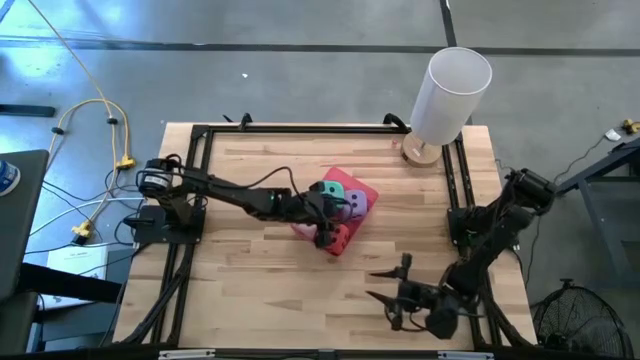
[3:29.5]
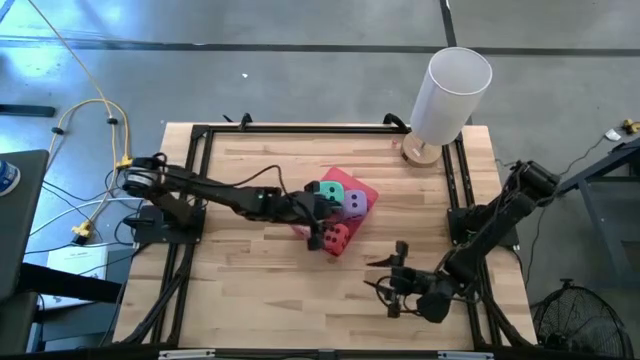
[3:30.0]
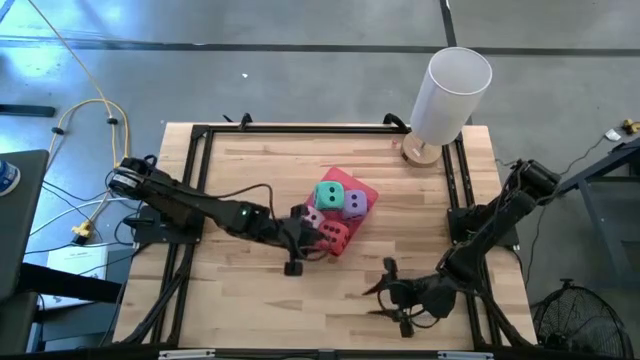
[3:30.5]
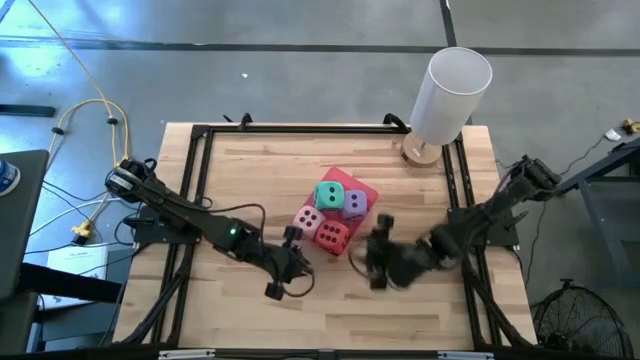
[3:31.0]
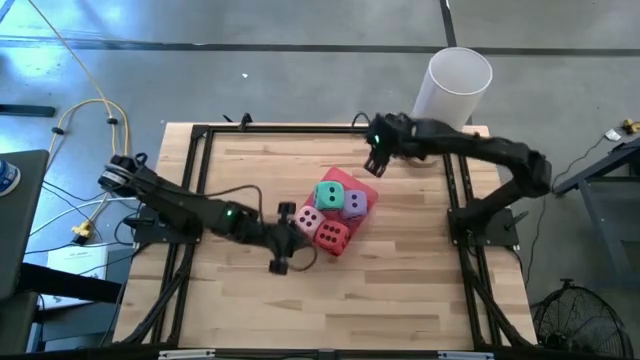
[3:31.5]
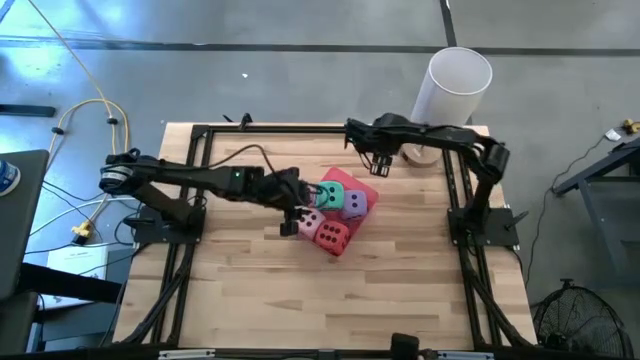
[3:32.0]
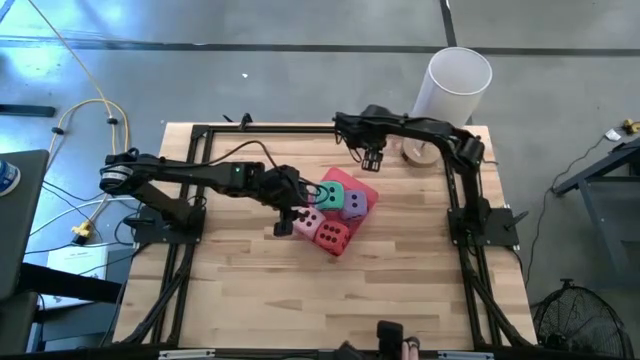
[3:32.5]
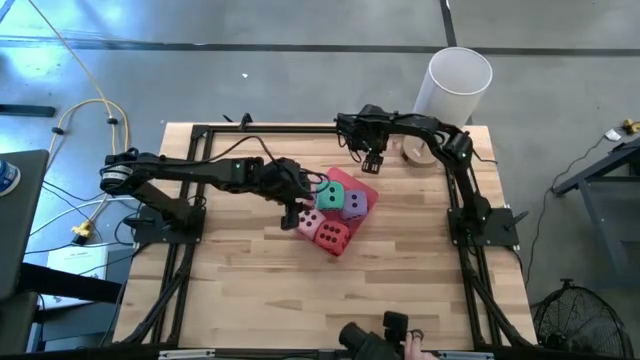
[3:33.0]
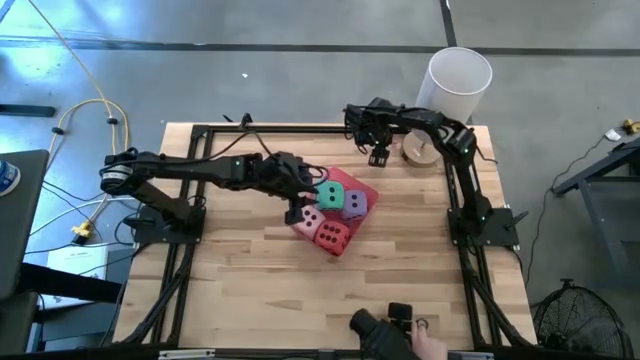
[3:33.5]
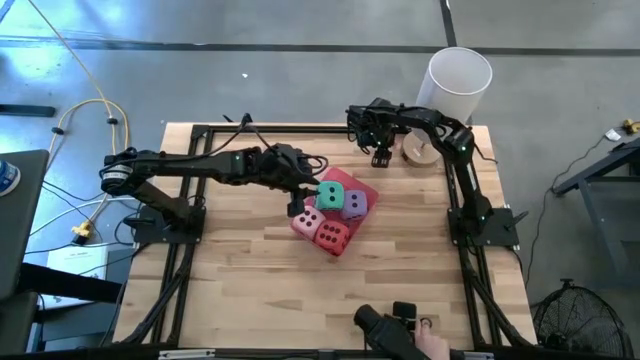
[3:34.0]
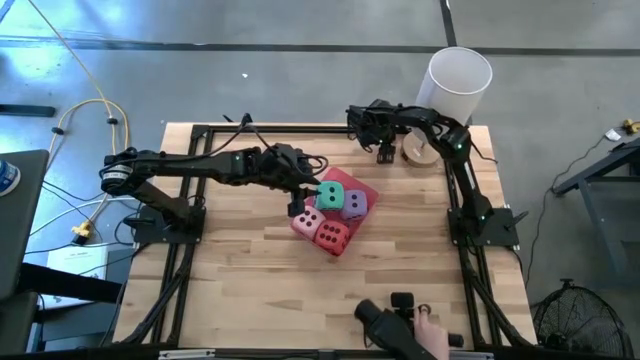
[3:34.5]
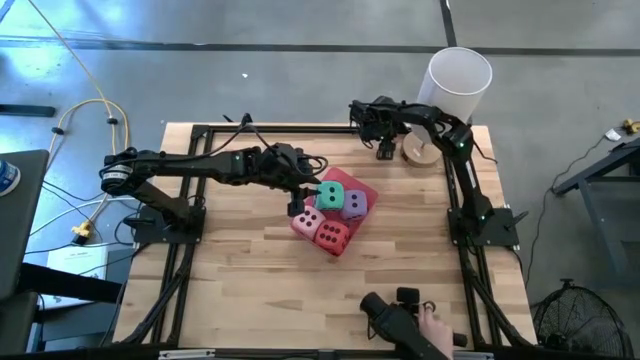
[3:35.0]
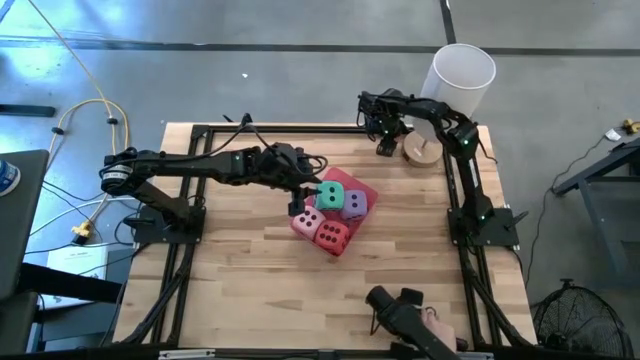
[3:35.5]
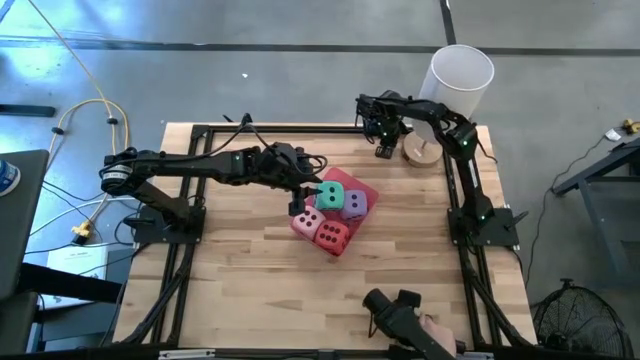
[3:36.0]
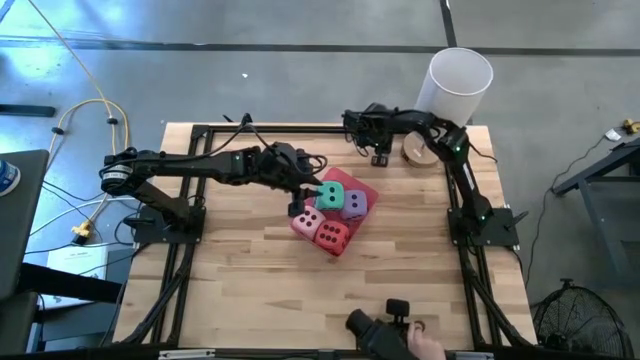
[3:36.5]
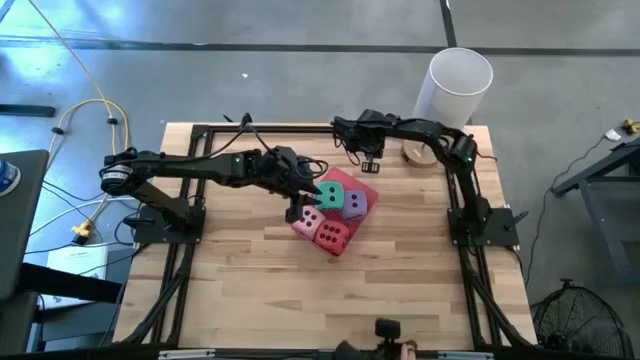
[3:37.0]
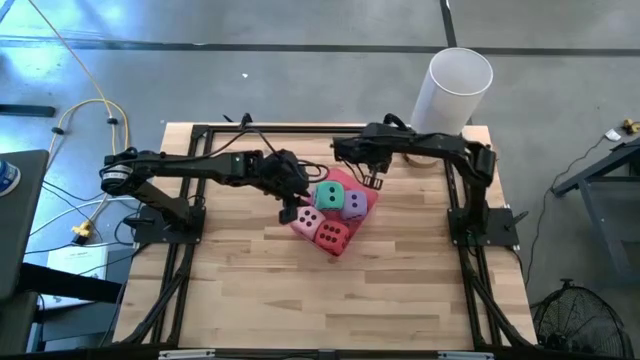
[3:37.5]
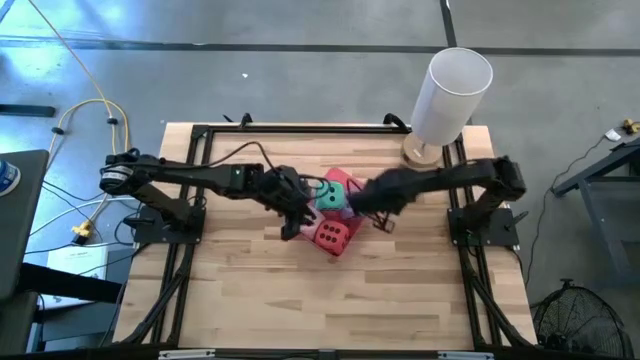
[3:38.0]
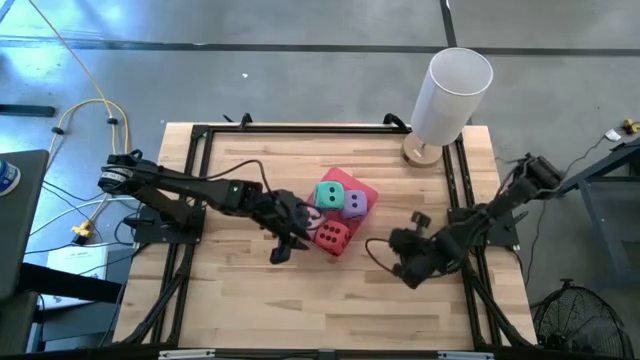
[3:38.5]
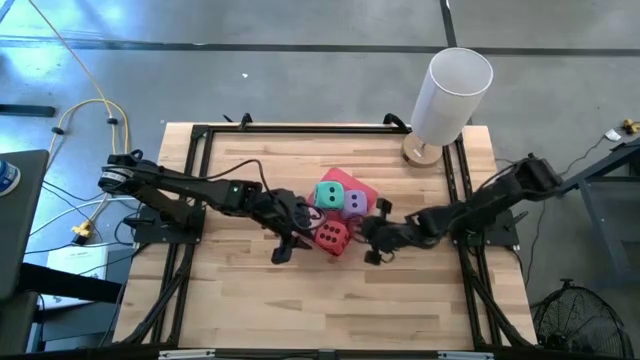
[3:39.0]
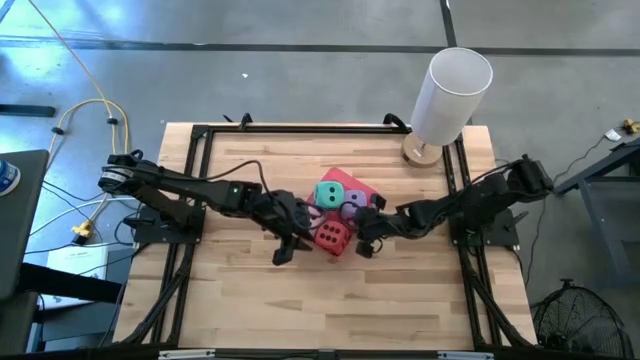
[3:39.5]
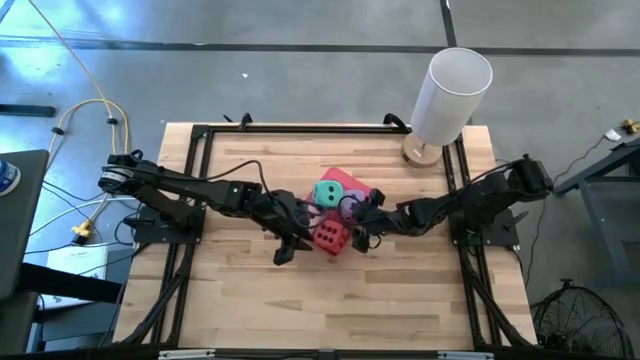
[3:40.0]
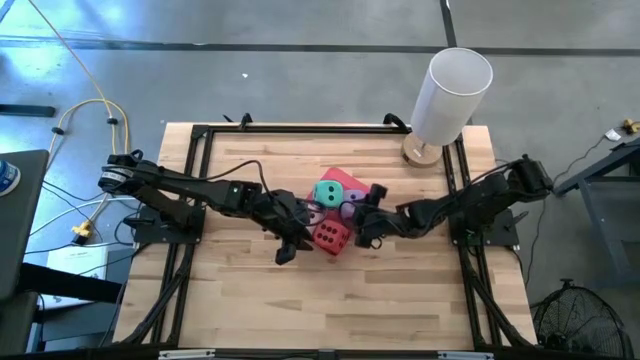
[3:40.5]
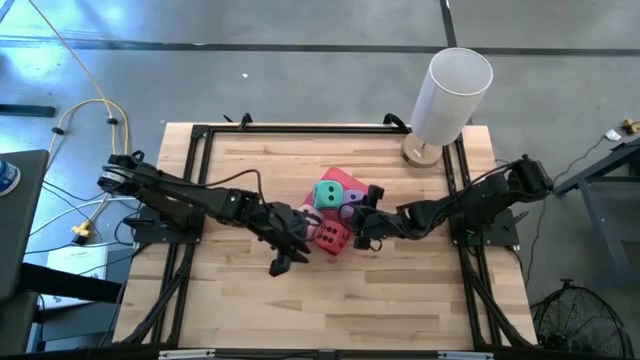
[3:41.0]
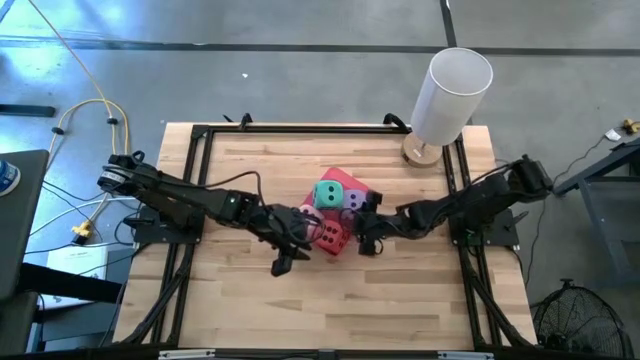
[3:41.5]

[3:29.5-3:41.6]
Task: Pick & Place Dice
Put the small pink die into the red bin

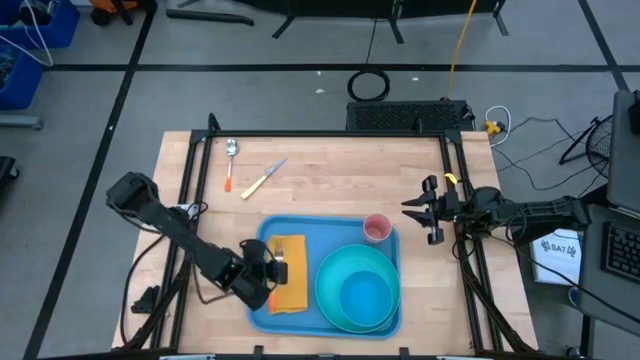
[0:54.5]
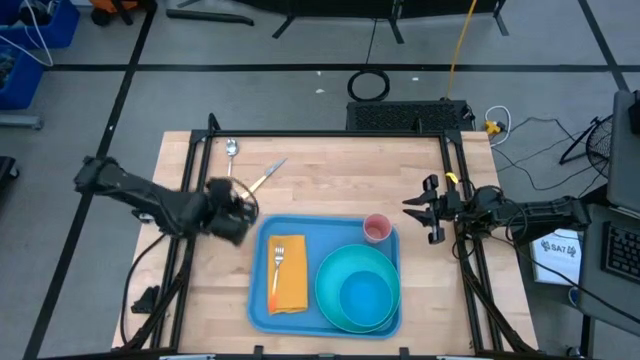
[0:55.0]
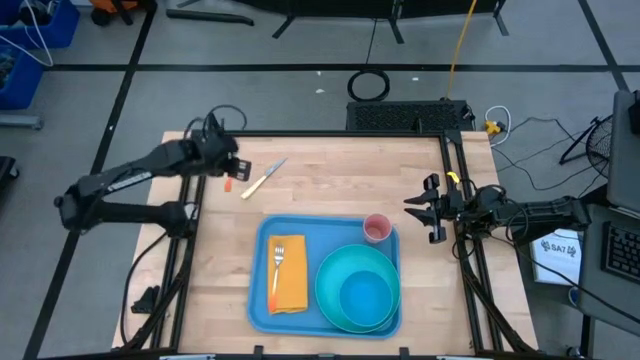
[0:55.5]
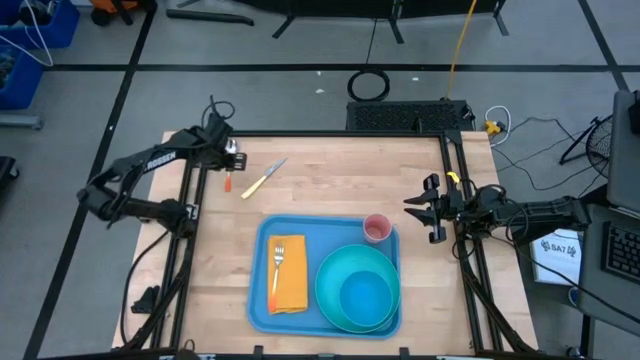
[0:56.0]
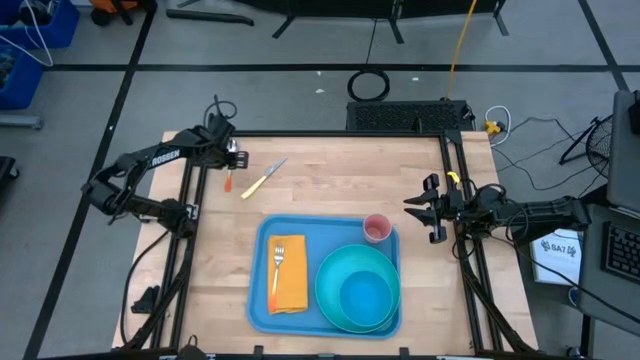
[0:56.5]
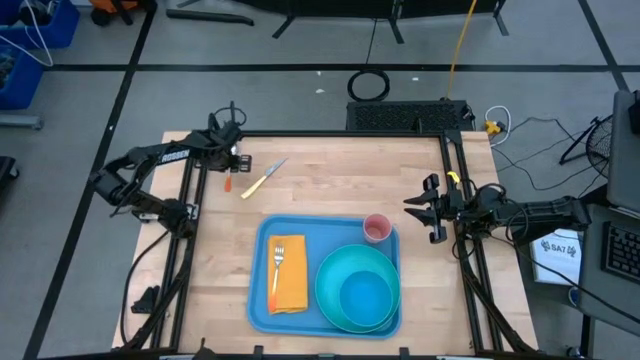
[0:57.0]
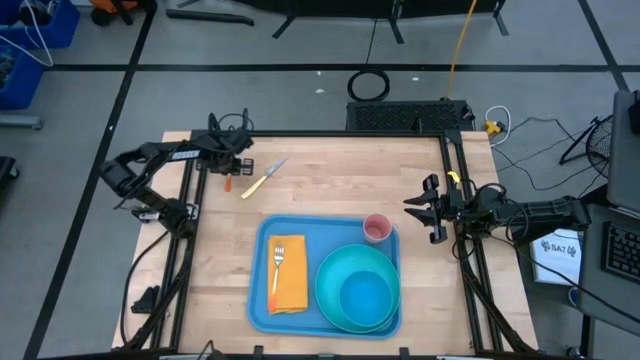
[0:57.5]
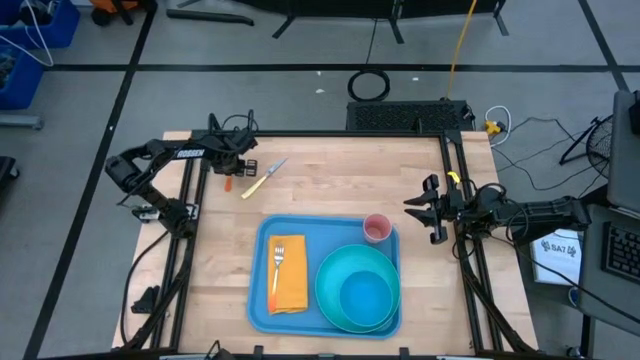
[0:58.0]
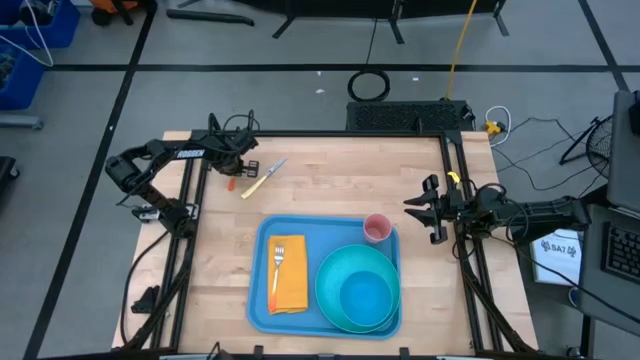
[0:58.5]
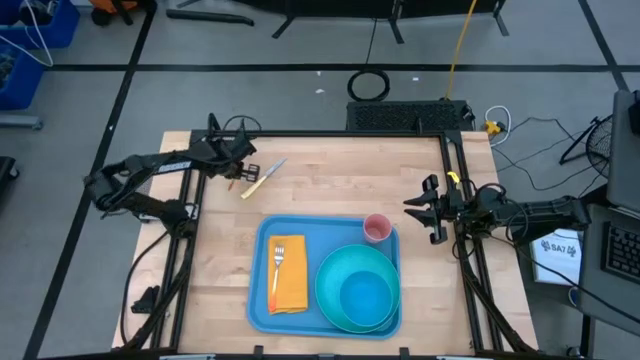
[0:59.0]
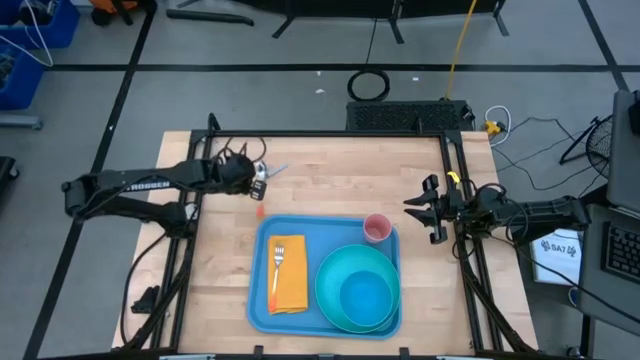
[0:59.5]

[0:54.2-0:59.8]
Task: Set up tray
Put the orange spoon on the yellow napkin to the right of the orange fork
